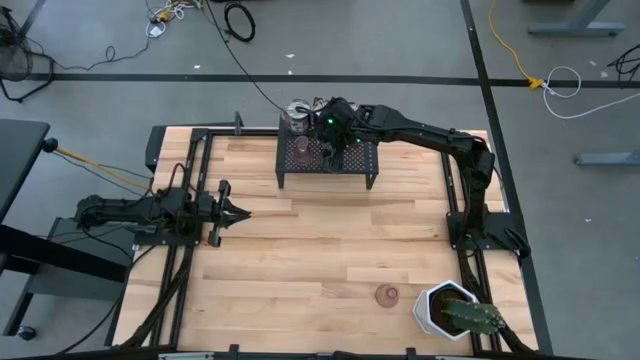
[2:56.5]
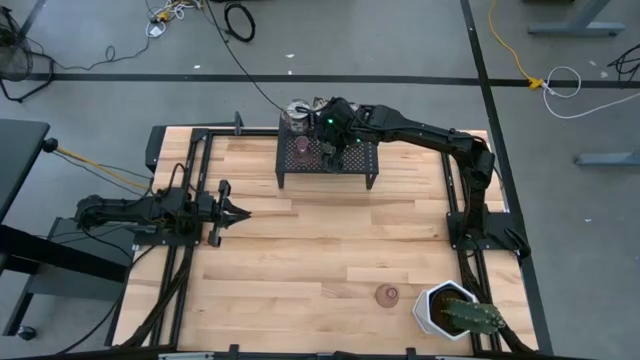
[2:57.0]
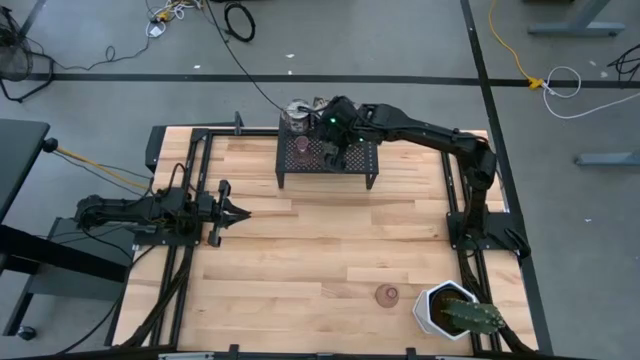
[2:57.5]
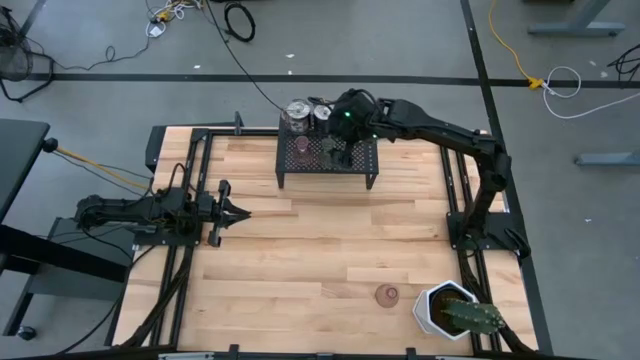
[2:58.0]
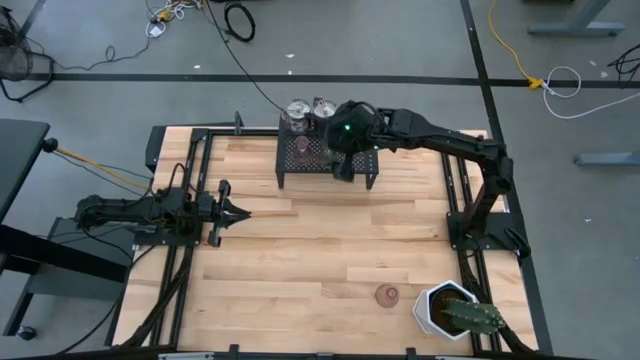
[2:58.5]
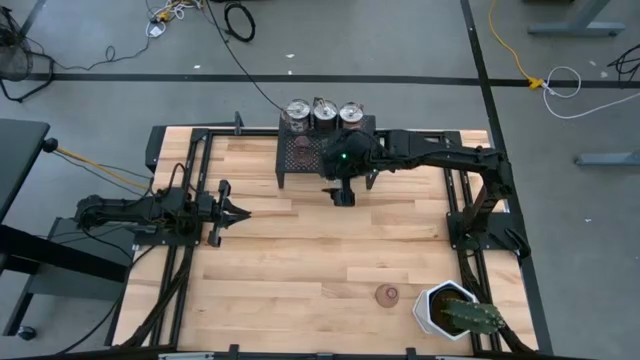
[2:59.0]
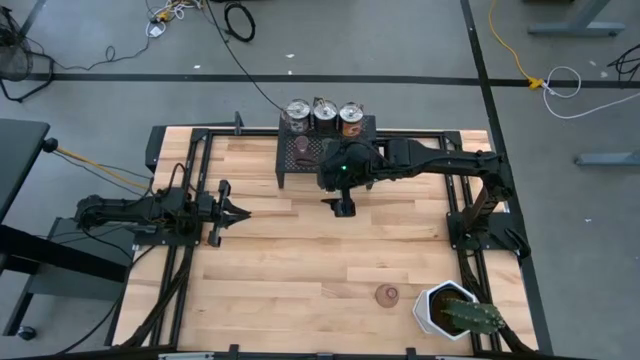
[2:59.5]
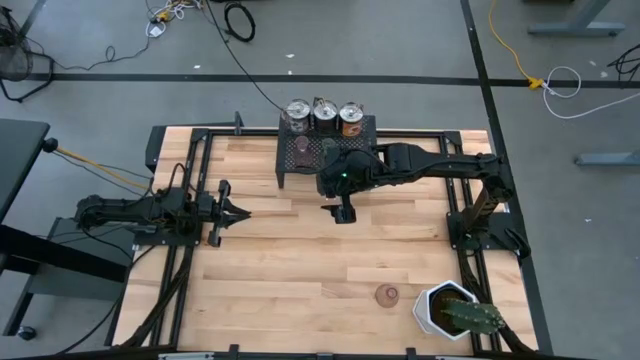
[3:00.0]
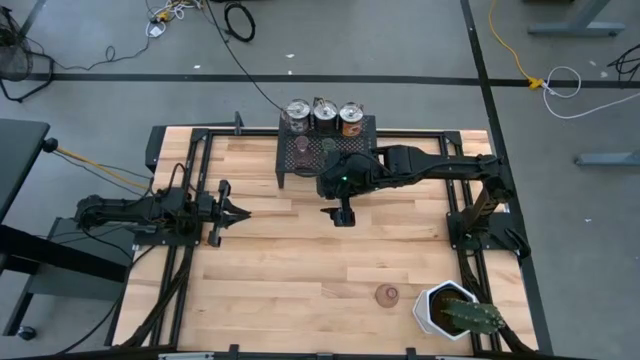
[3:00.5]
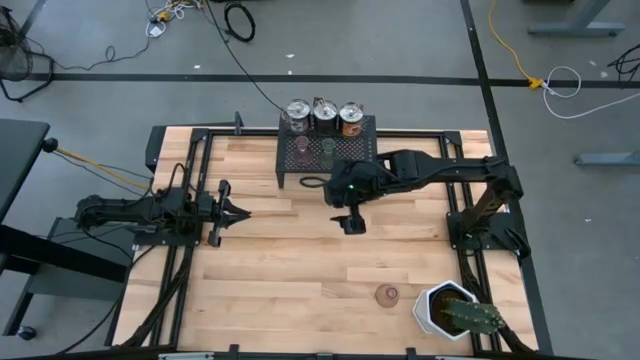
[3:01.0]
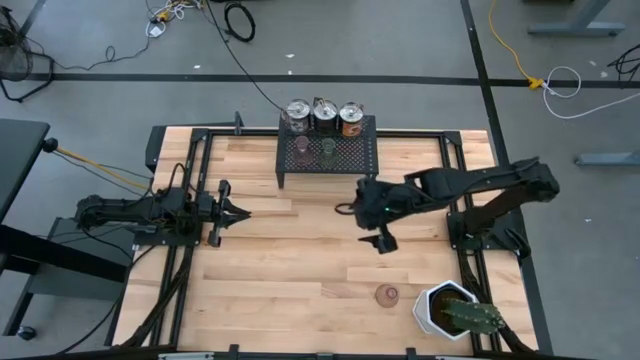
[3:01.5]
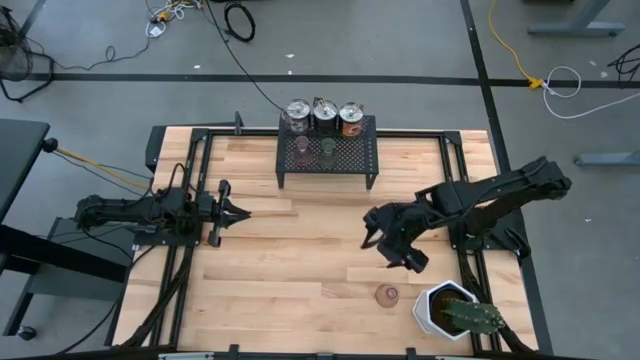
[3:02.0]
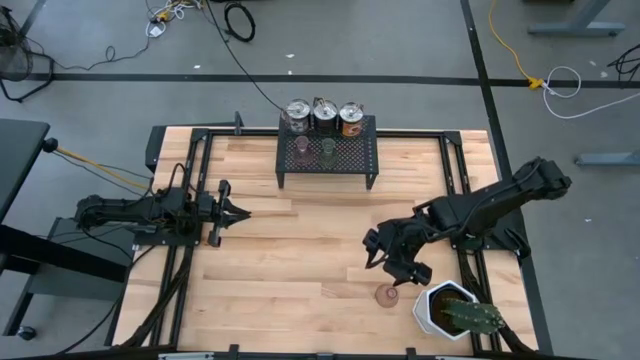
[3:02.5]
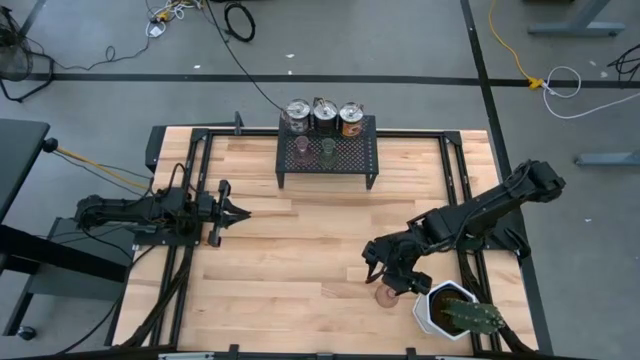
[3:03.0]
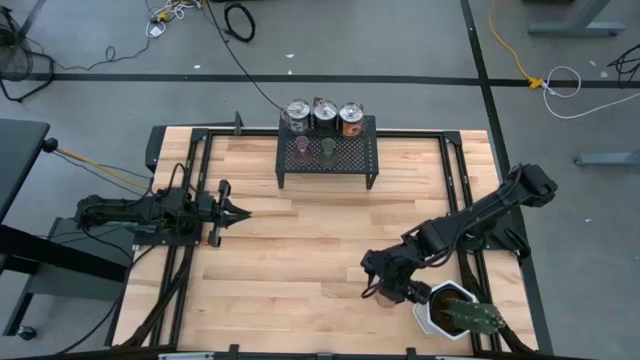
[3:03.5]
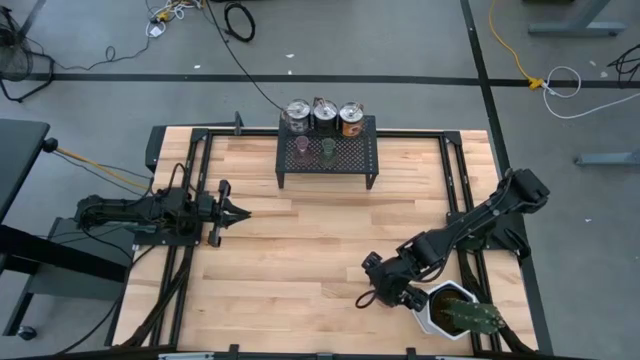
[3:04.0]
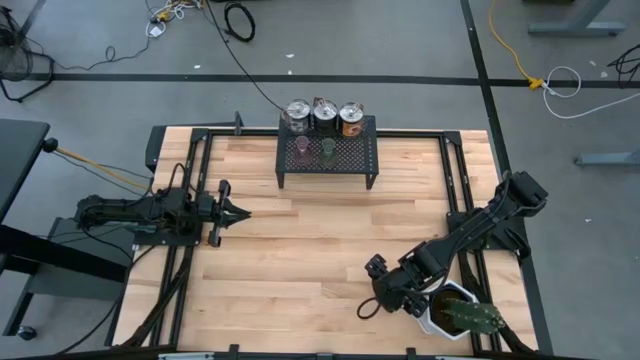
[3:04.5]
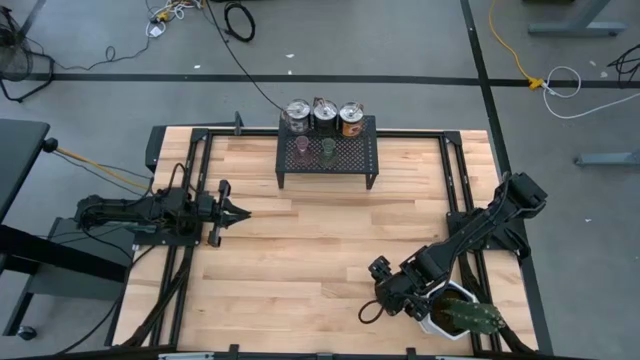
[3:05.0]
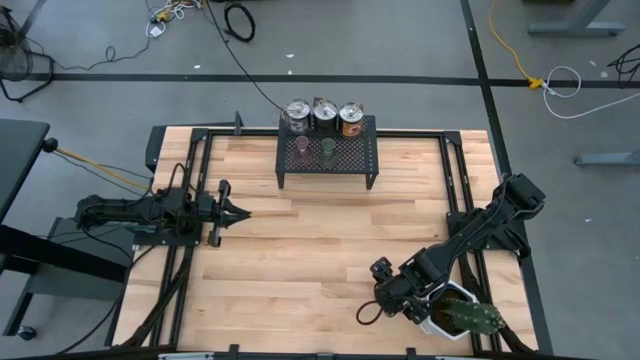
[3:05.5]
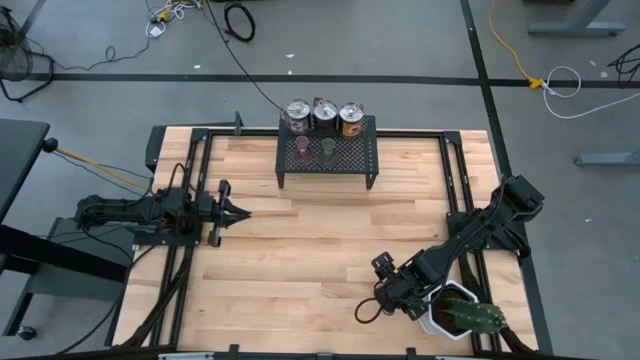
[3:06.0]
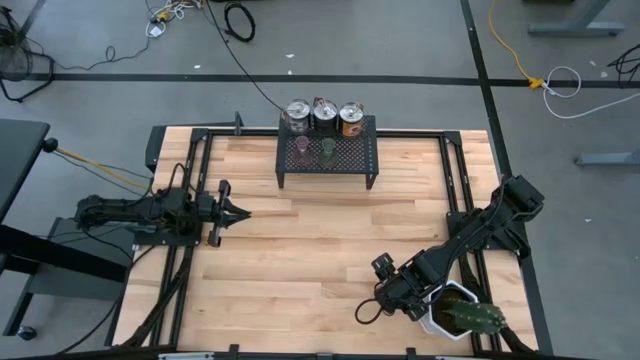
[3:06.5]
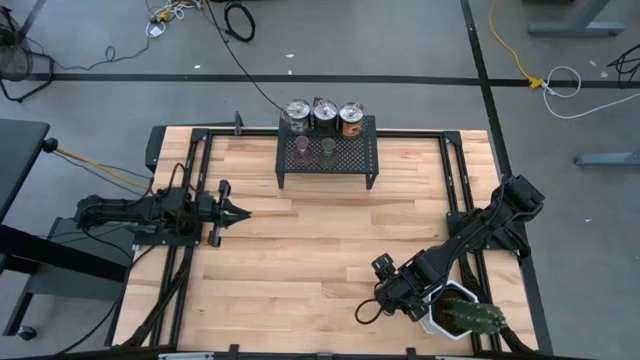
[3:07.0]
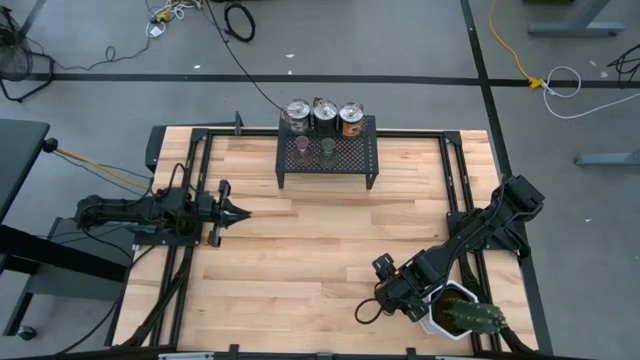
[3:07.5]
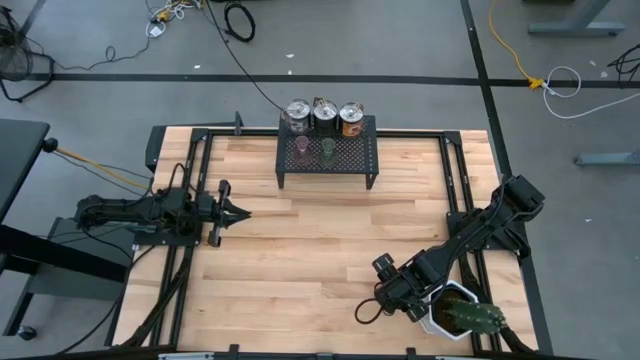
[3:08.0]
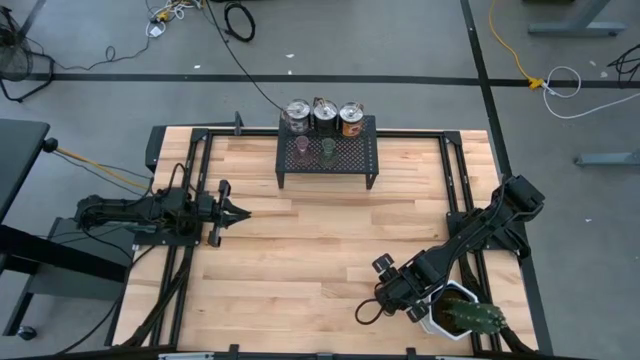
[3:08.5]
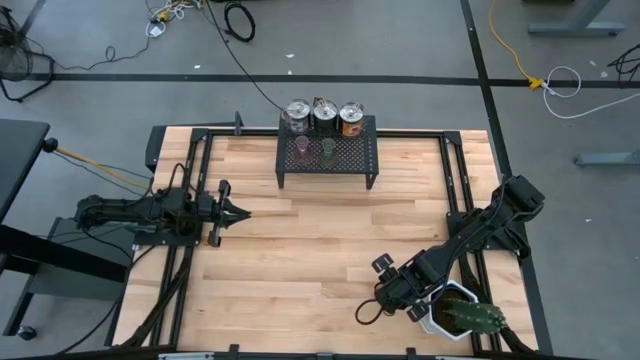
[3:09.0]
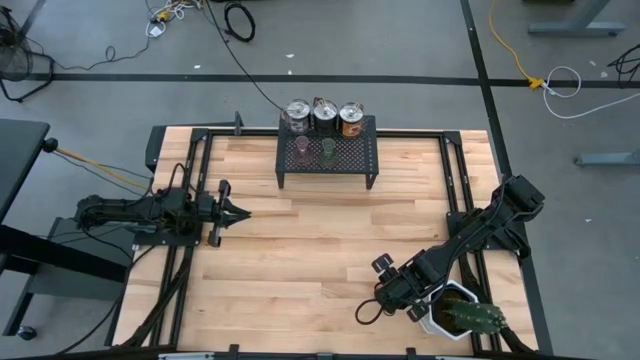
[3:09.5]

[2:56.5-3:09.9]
Task: Pick & Place candle stick holders
Put the pink vase candle holder on the shelf

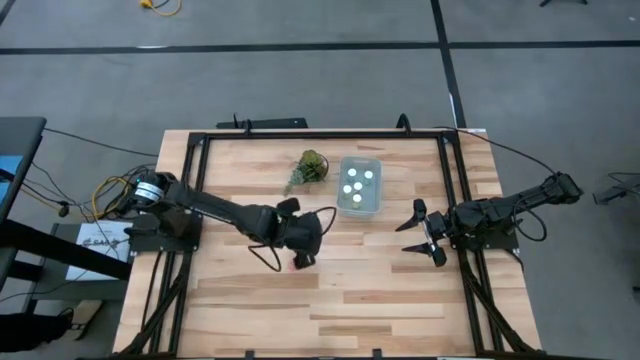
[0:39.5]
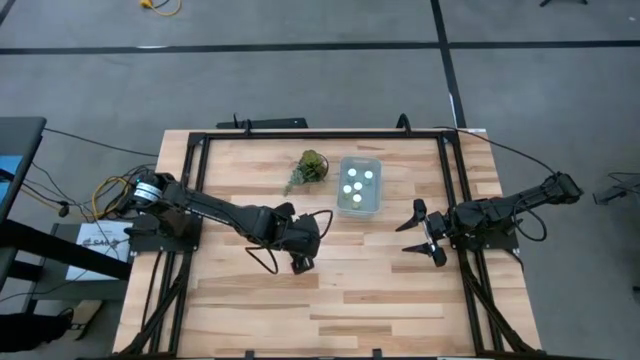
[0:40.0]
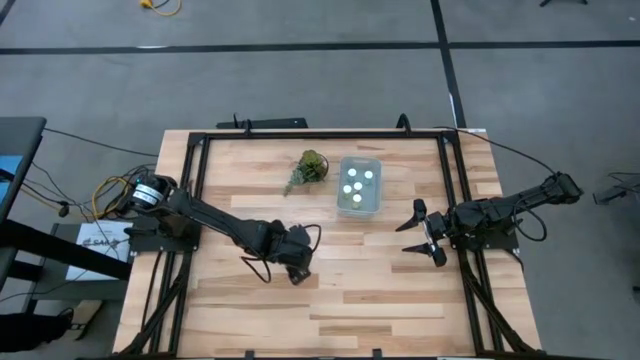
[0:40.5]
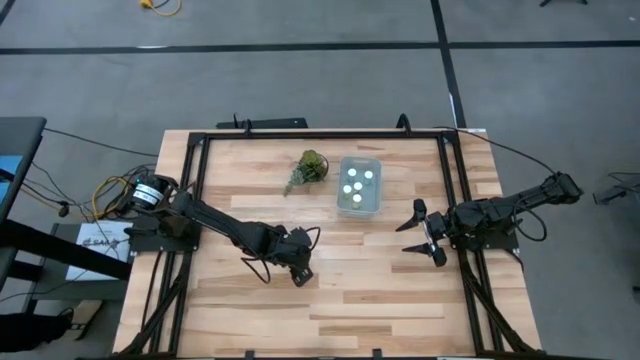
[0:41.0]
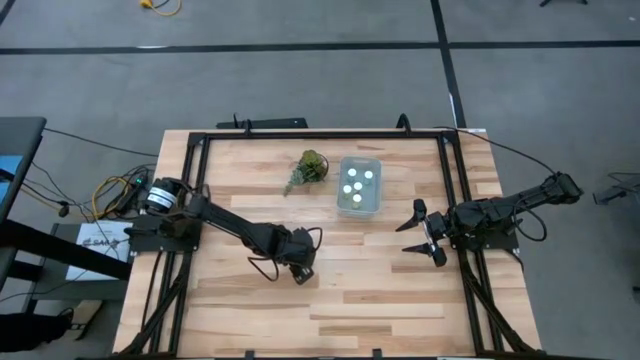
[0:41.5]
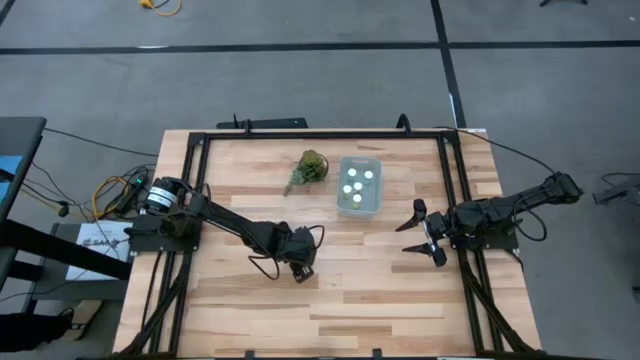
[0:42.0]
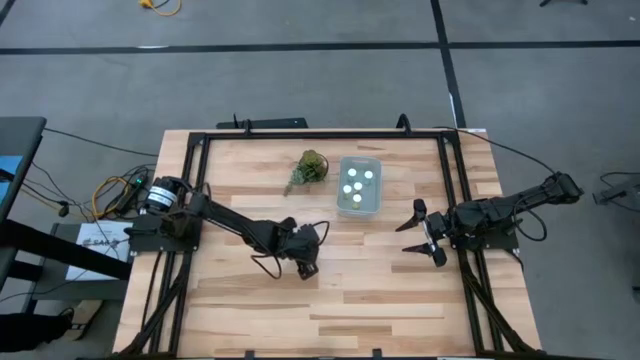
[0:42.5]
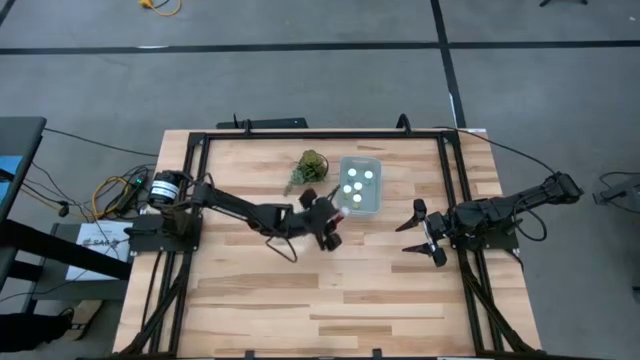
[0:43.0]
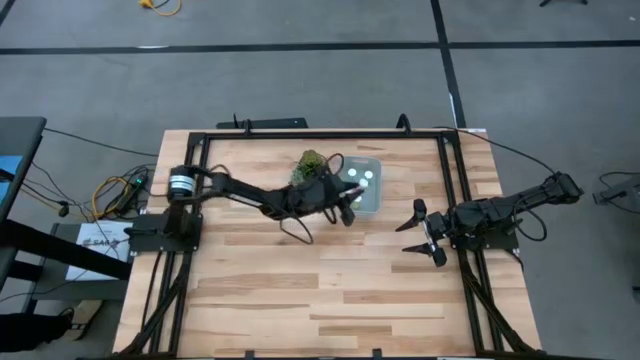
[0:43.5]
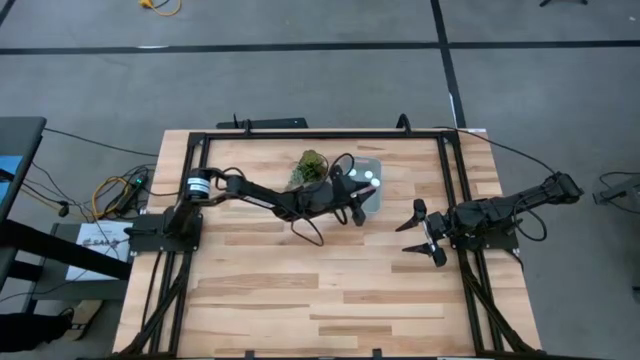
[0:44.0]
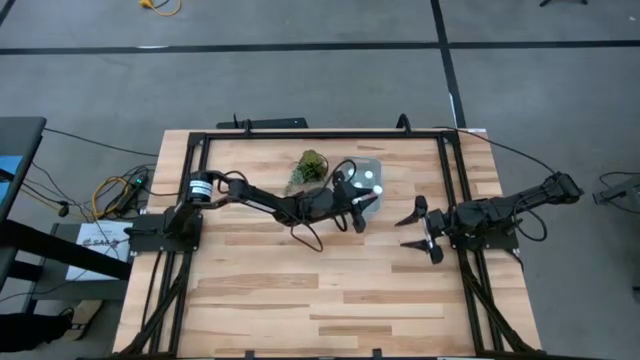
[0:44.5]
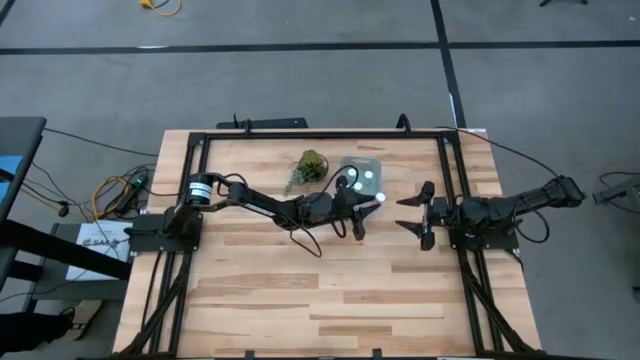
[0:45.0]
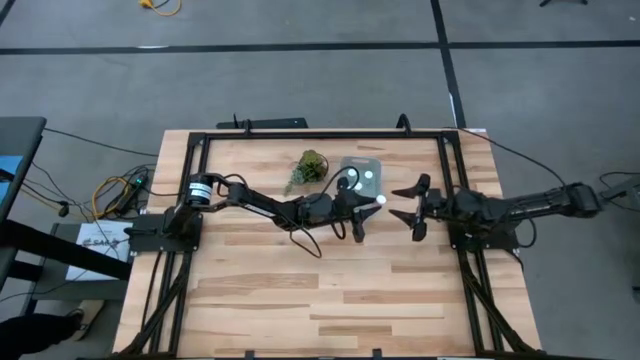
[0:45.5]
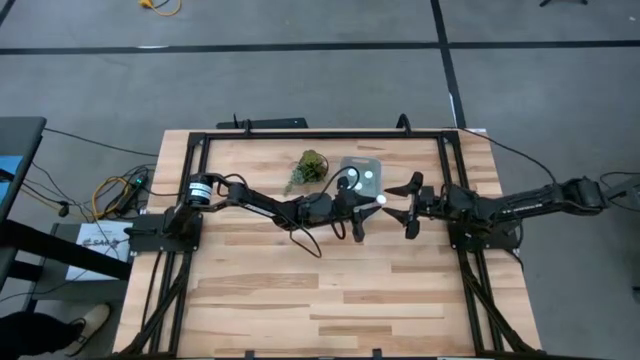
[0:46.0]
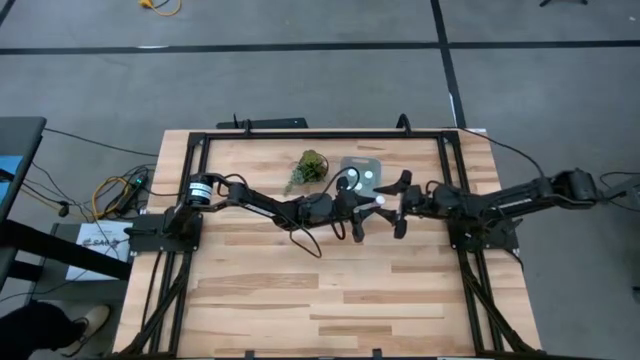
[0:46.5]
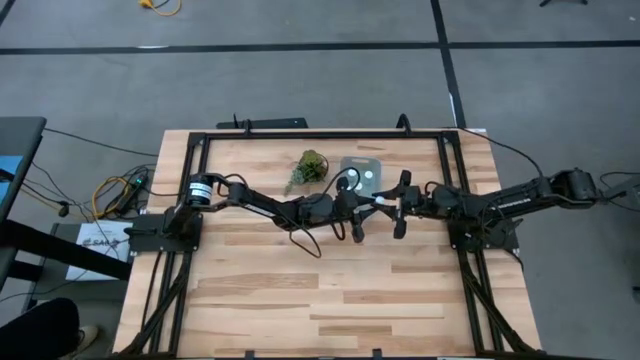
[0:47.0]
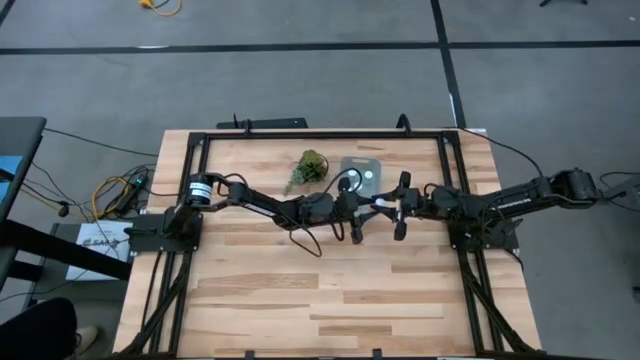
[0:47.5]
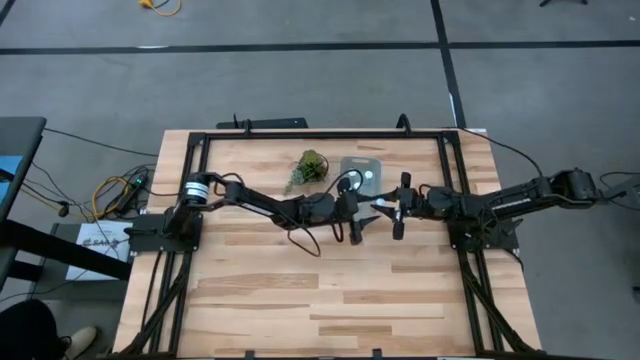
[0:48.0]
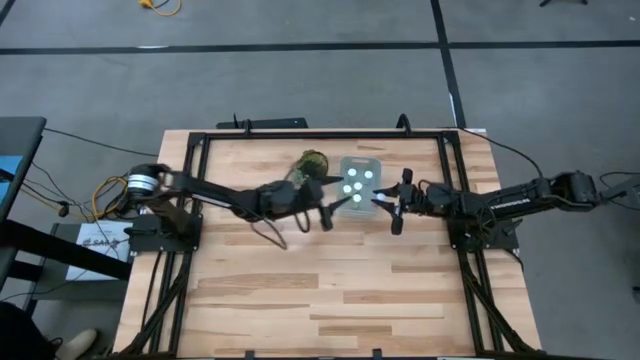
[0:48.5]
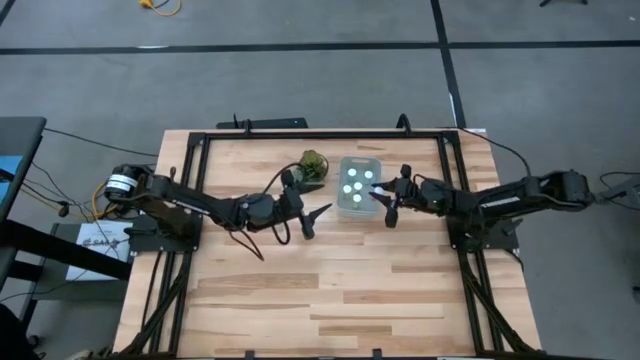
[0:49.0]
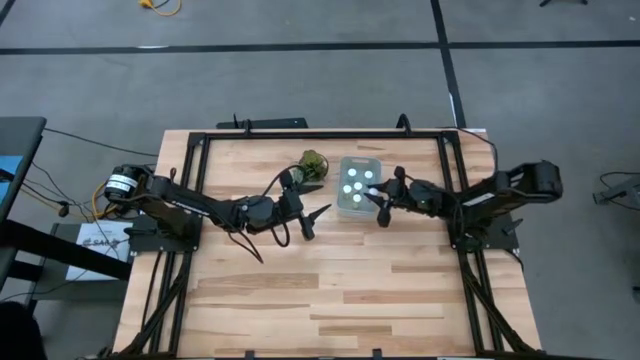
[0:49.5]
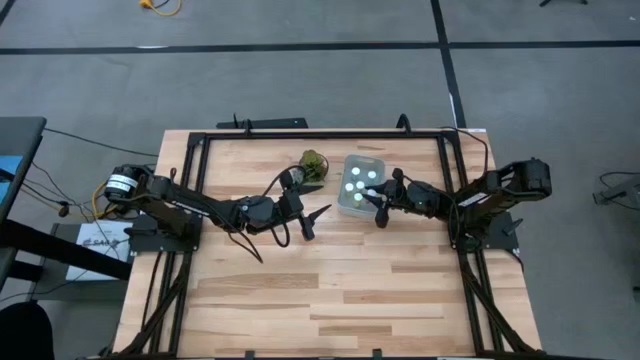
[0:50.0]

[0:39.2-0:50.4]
Task: Pick and place pill bottles into a basket
Put the pink pill bottle into the gray bin
